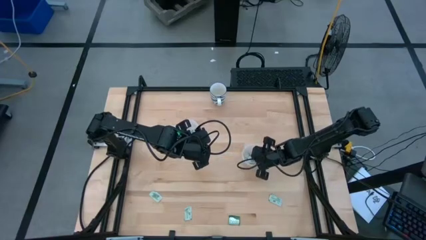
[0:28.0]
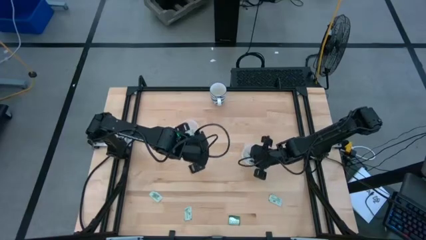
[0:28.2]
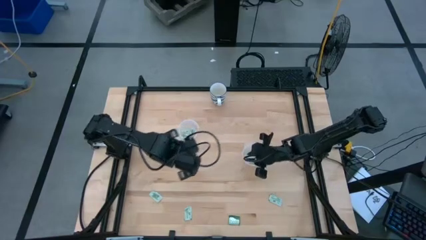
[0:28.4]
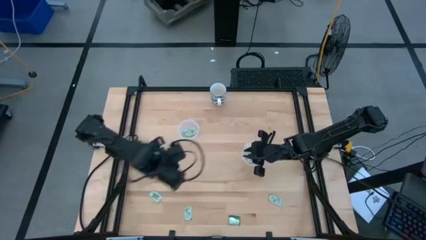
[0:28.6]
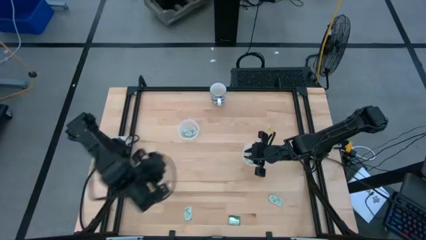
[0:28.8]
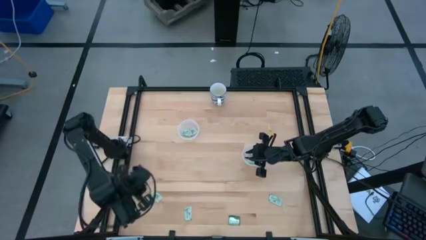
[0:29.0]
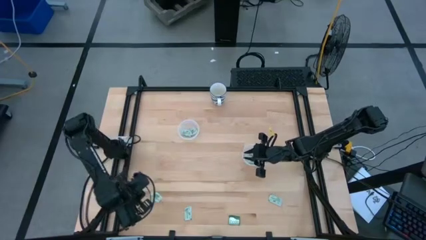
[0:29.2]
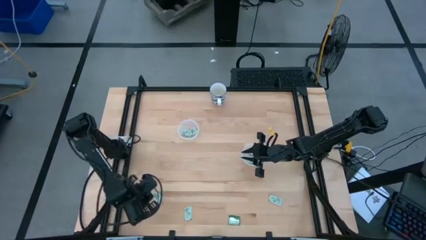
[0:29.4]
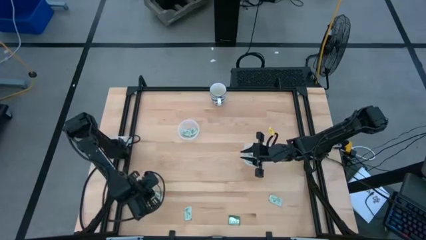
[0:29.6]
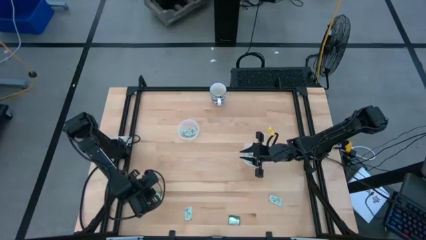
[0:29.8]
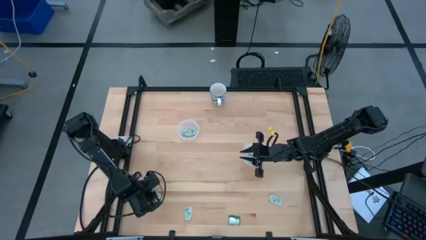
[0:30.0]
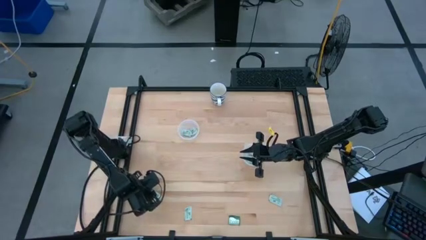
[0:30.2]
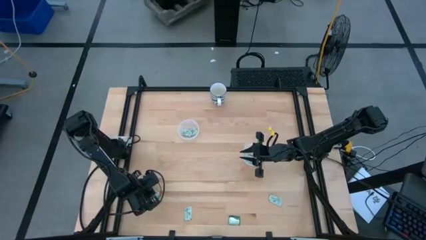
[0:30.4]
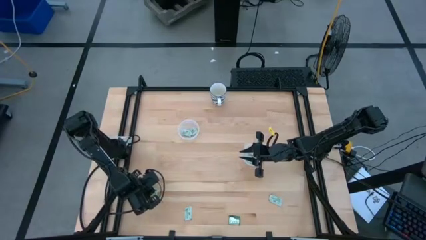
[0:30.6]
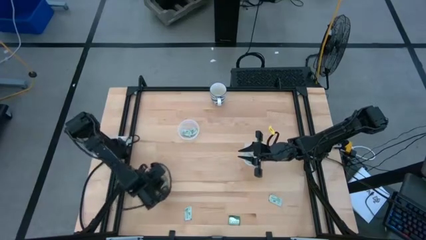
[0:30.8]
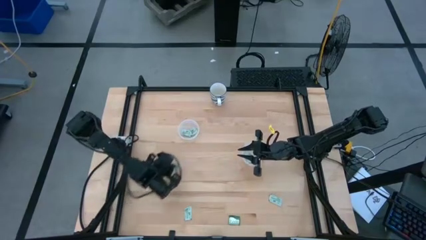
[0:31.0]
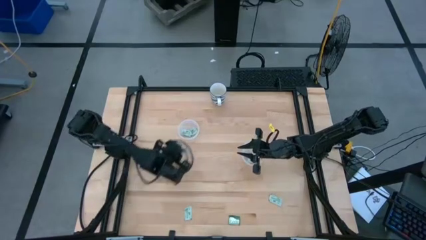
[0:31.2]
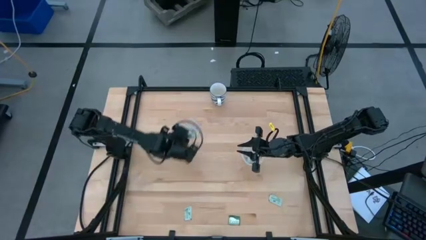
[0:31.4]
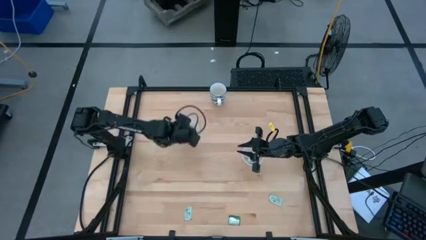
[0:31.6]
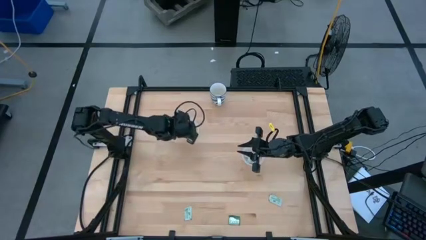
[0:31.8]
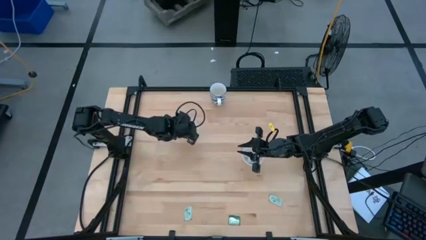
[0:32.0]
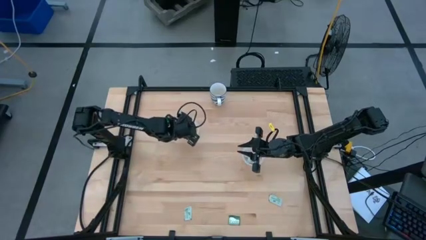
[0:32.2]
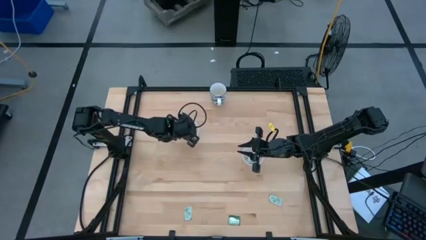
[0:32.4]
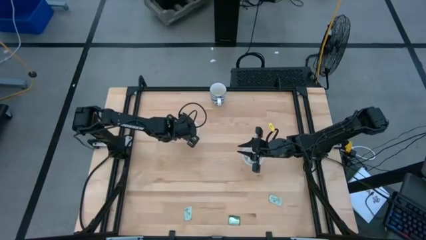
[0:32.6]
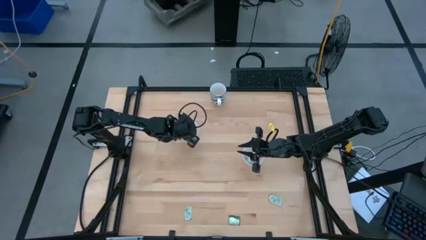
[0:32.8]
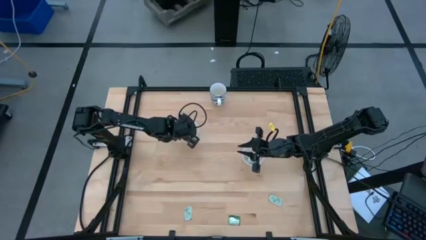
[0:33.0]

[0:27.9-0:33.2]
Task: Pick and place Stevia / Truvia into bins
Put the left light green stevia packet into the left transparent container

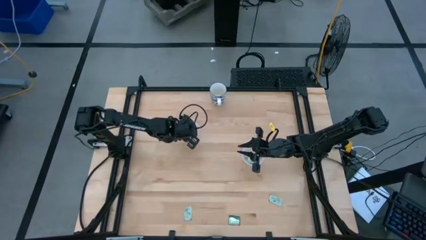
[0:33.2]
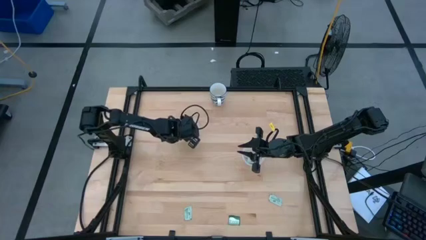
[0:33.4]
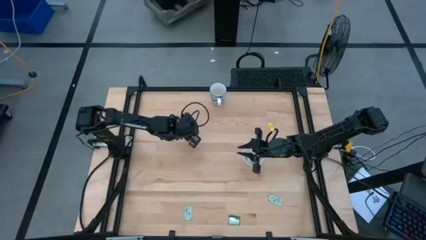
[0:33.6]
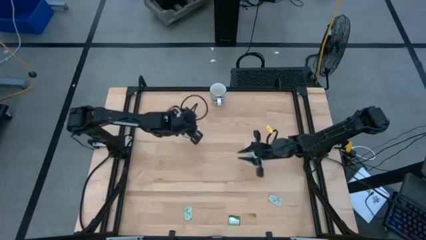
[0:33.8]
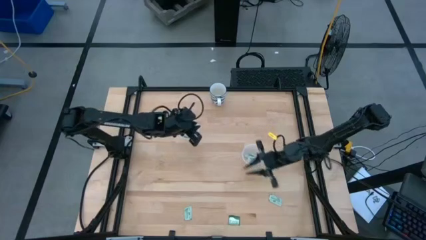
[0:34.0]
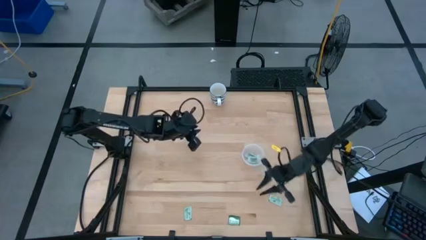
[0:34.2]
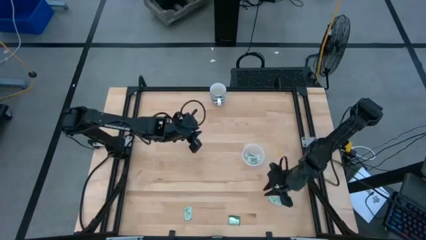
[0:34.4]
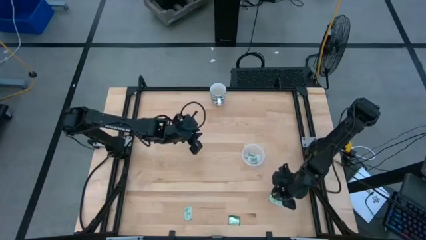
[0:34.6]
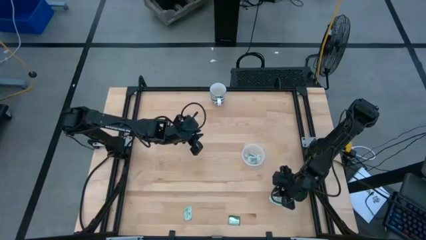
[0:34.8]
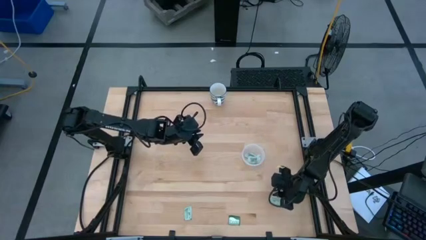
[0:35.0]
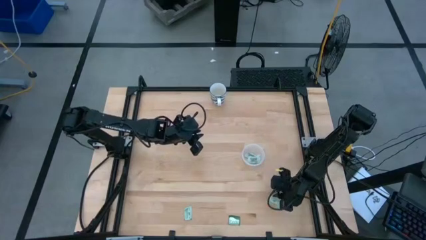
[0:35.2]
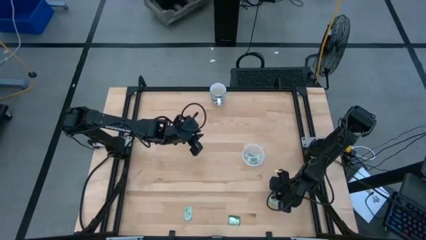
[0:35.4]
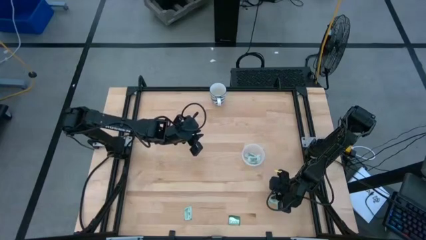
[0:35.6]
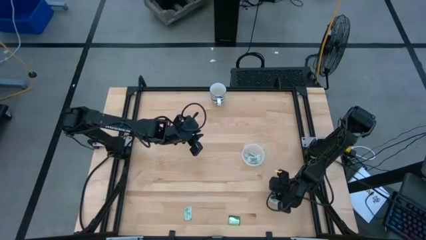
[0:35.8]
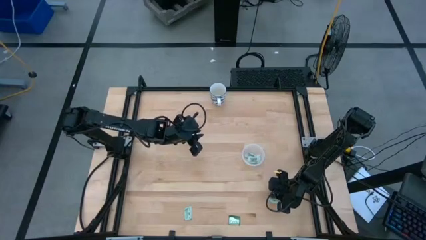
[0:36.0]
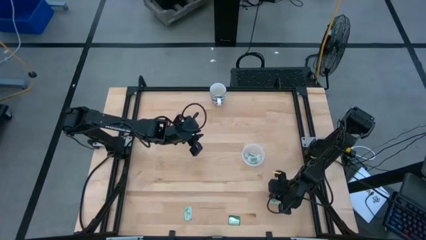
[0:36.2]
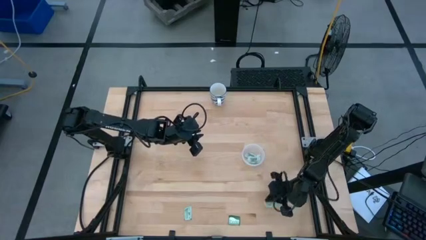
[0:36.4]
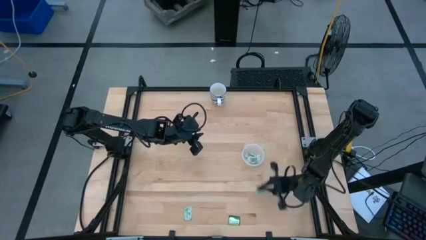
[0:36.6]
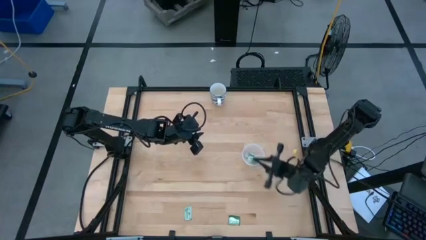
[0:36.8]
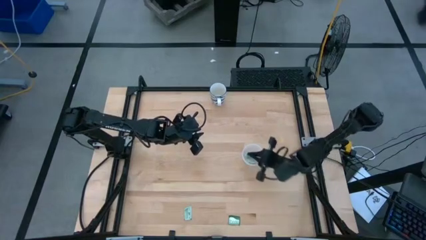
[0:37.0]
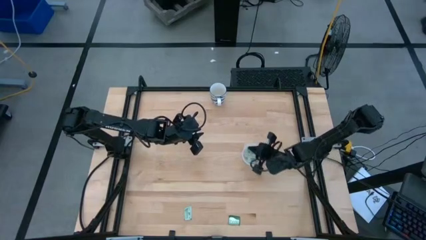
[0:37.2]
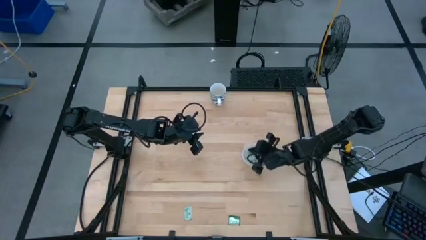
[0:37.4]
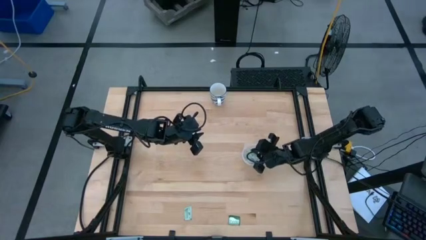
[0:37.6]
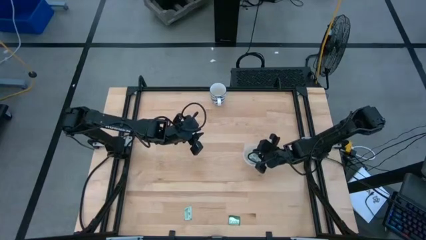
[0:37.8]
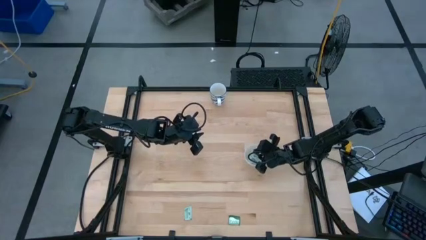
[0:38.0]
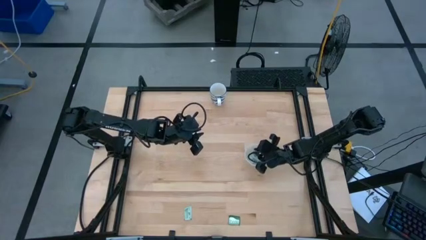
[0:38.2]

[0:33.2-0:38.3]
Put the right light green stevia packet into the right transparent container

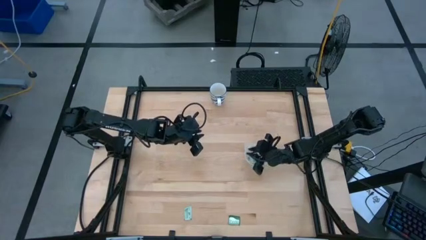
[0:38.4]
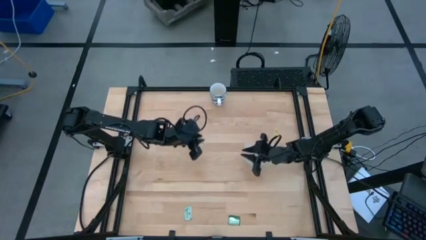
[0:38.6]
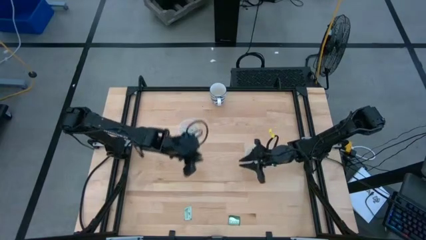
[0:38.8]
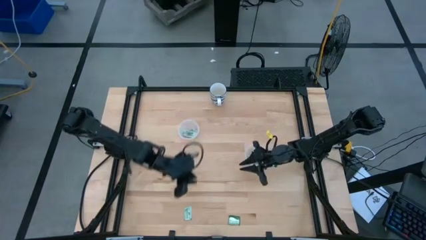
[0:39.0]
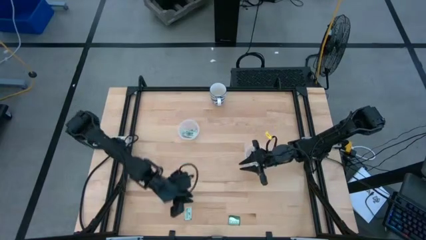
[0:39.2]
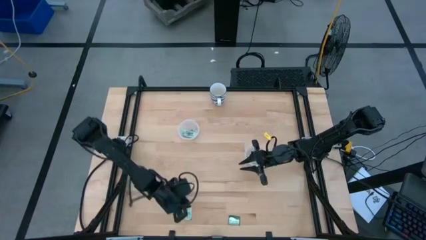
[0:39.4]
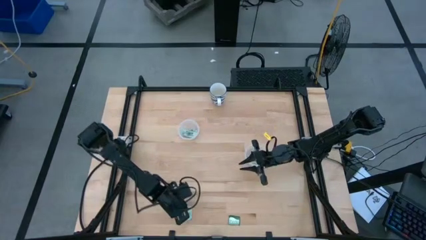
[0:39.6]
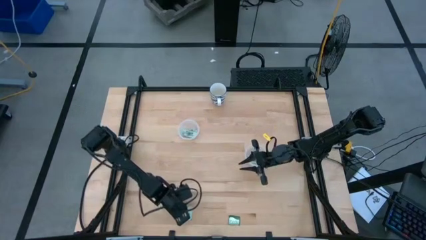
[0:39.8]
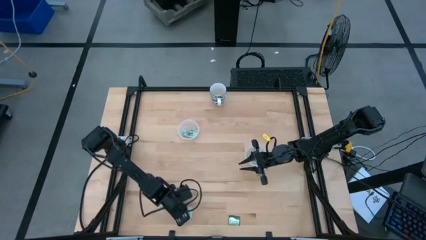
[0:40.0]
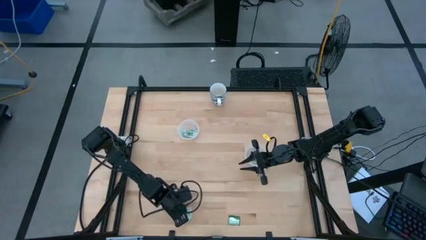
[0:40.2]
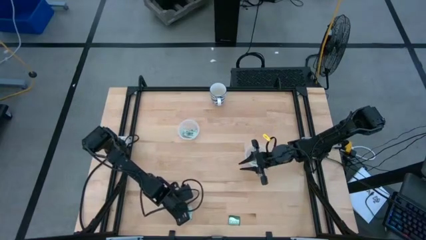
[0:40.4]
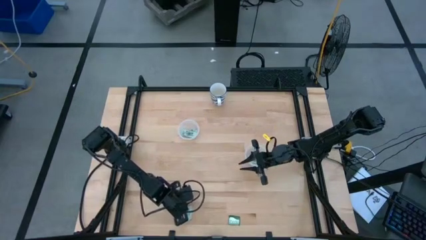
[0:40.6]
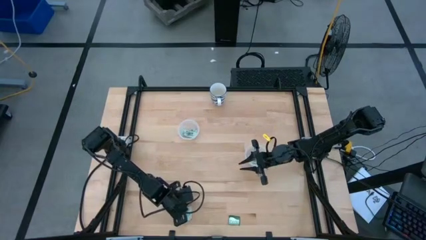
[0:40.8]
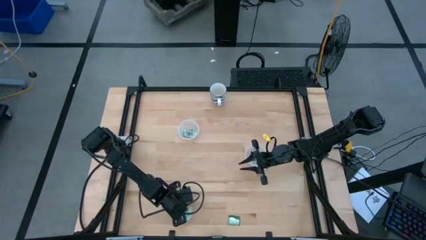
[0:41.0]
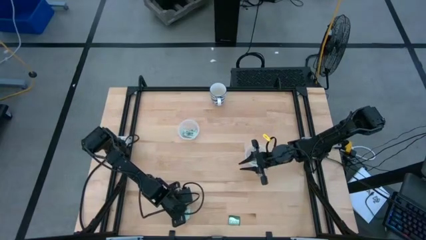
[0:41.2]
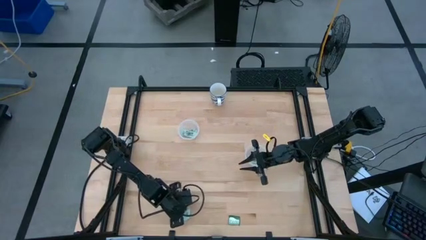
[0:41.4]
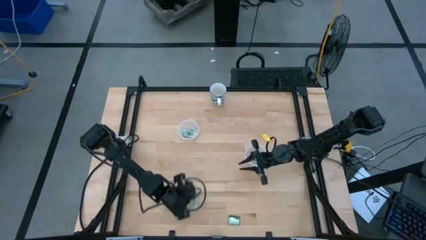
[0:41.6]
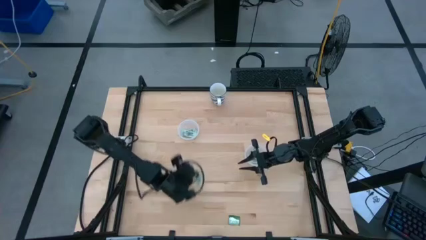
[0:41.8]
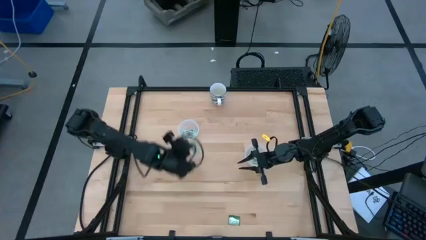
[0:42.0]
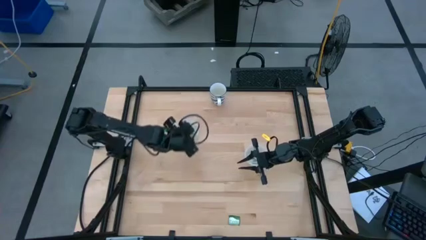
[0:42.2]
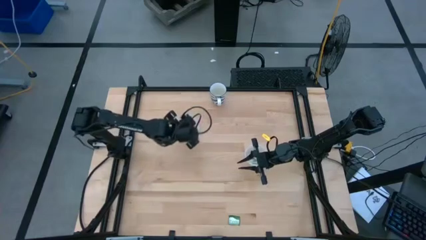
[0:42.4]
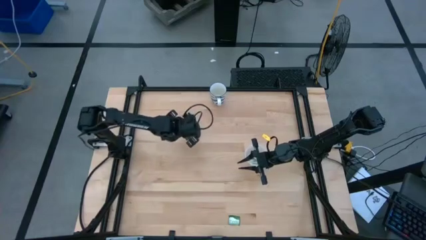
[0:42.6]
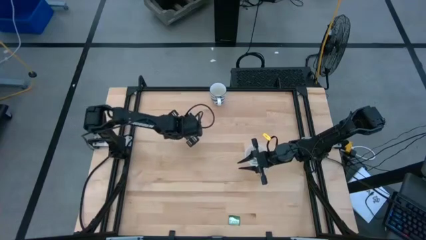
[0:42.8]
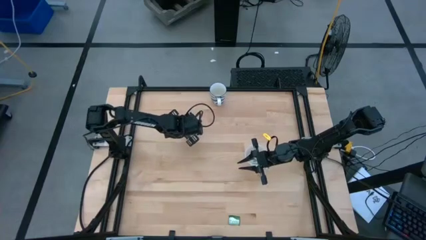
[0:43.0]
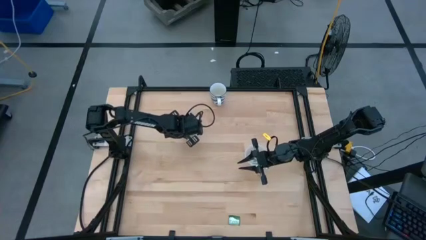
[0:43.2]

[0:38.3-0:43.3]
Put the light green stevia packet into the left transparent container

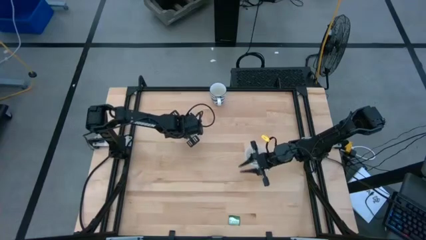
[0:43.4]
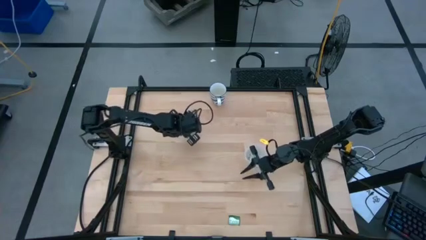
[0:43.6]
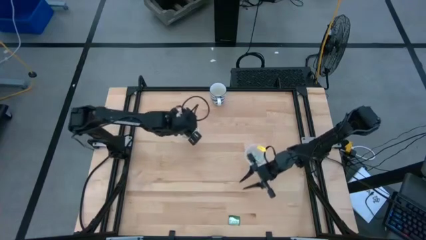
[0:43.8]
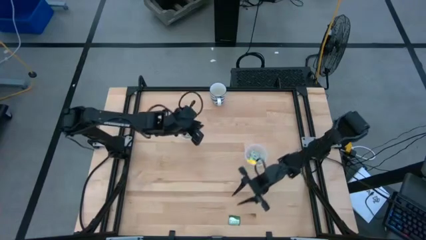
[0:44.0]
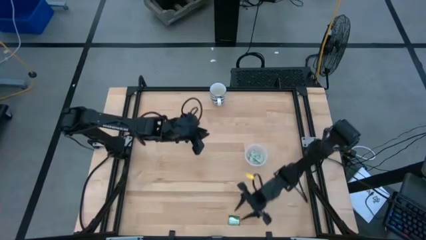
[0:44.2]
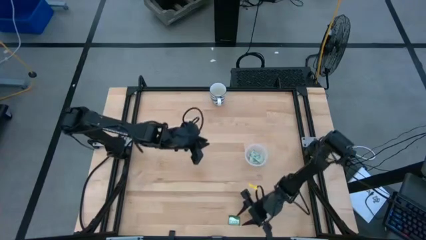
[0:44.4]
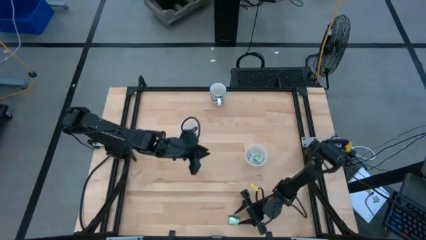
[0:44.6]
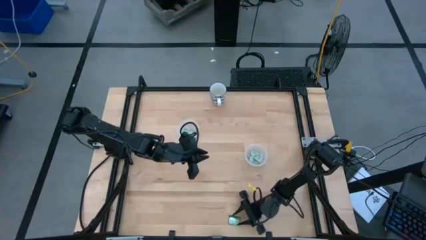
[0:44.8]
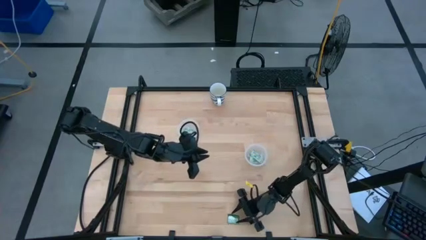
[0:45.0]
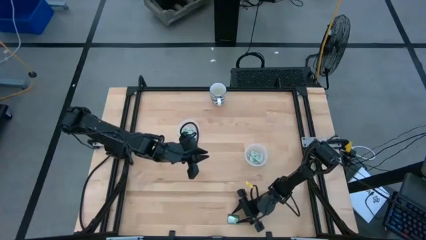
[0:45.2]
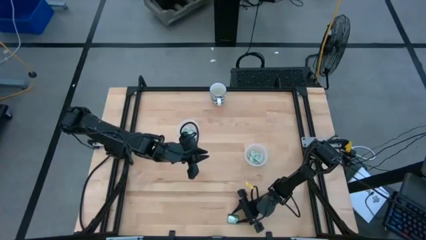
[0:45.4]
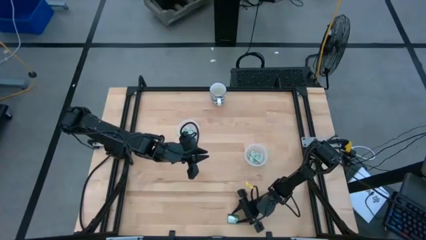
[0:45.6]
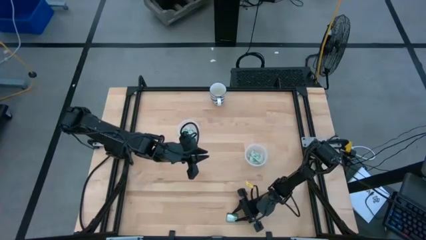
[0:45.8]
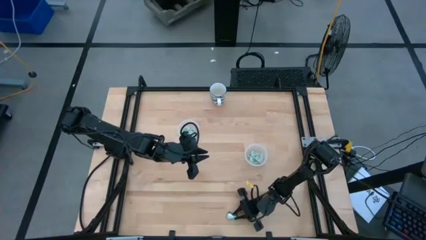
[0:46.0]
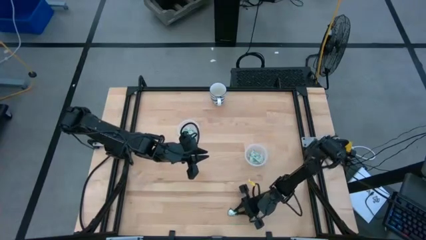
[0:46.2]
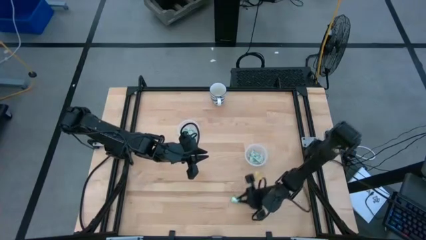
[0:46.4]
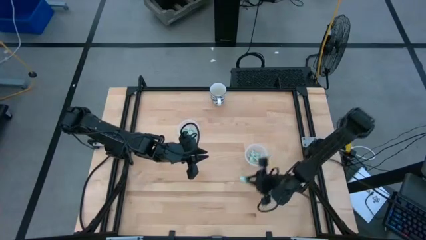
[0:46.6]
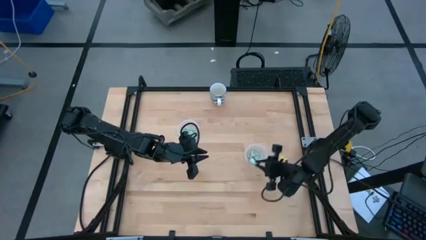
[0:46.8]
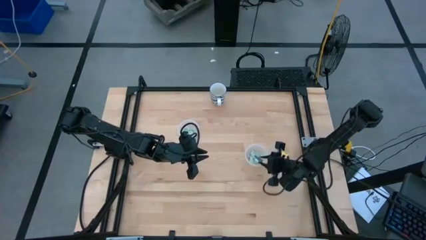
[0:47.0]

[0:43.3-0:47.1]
Put the green stevia packet into the right transparent container
